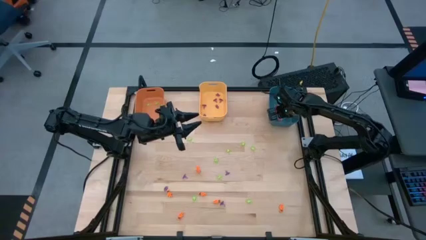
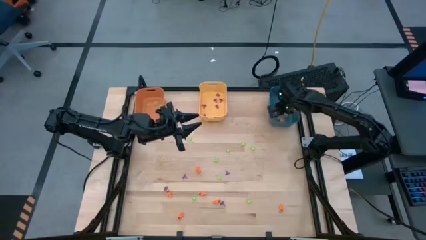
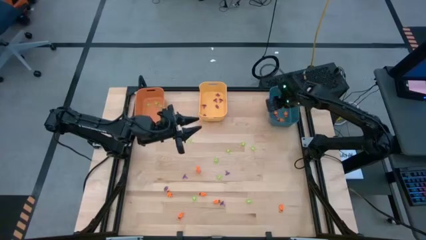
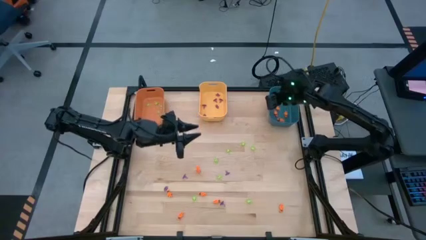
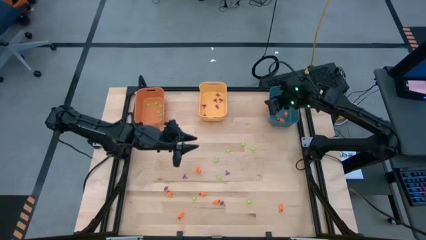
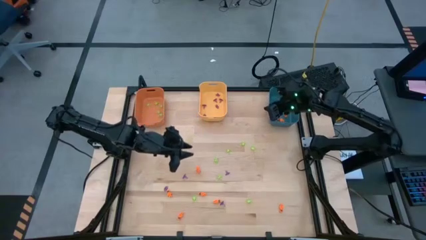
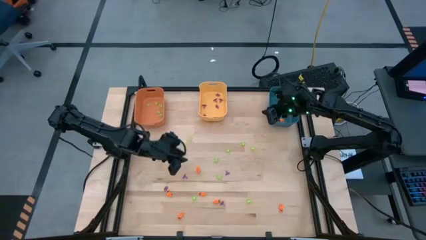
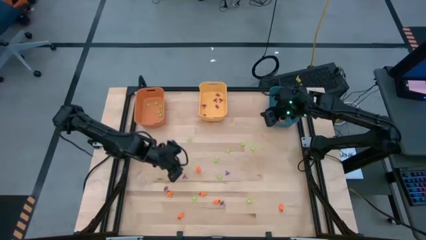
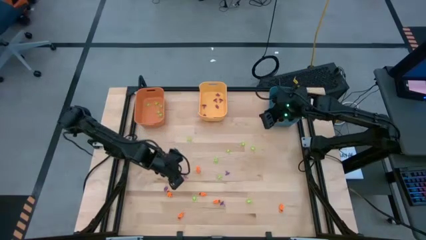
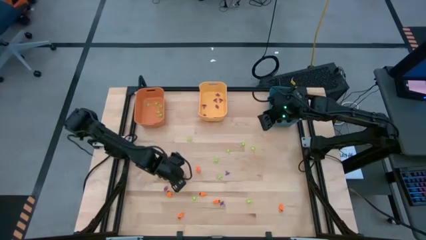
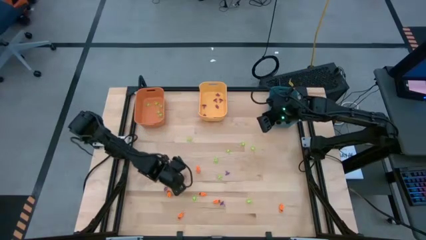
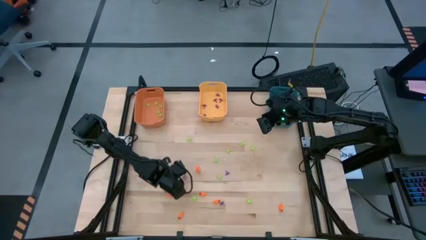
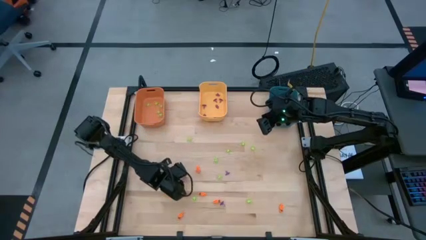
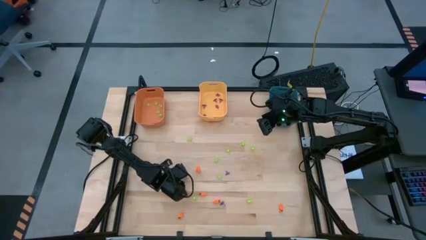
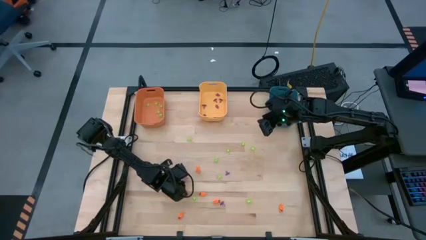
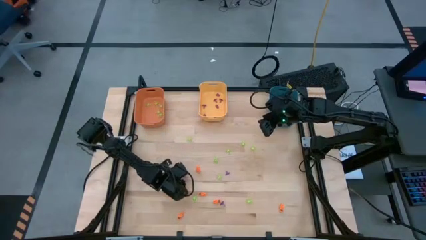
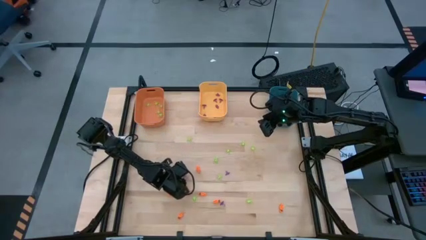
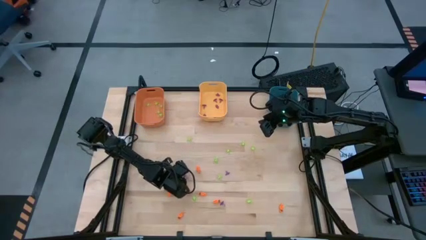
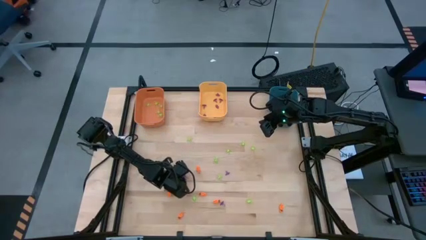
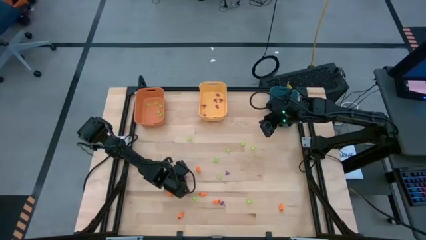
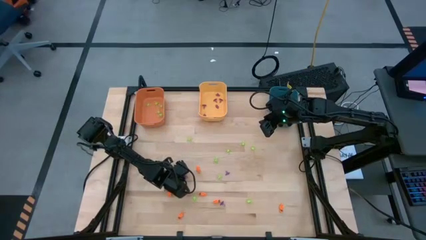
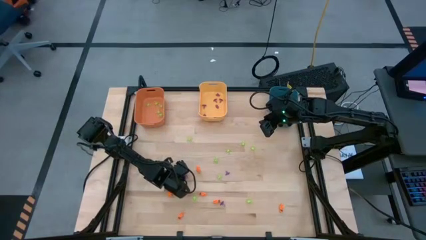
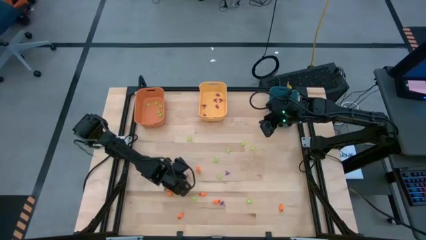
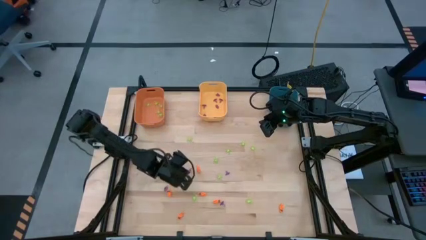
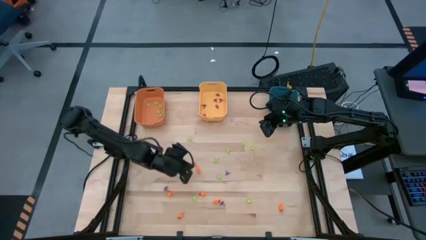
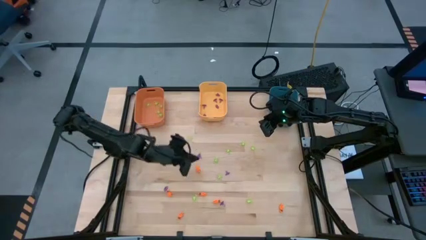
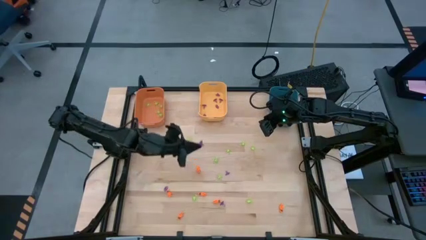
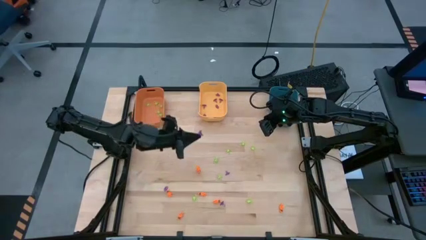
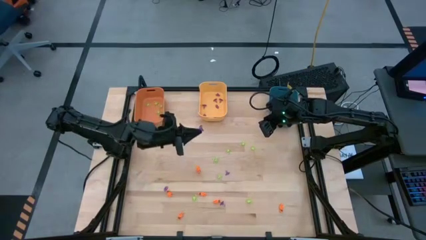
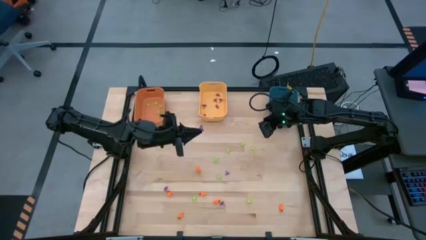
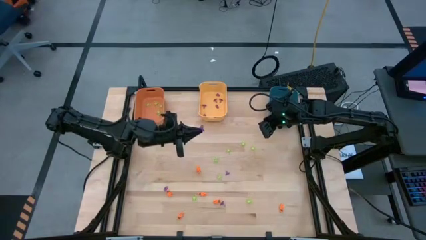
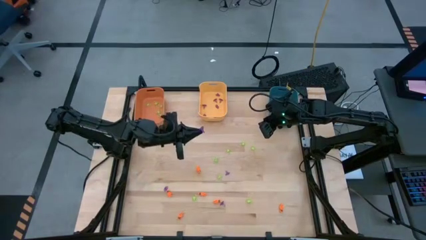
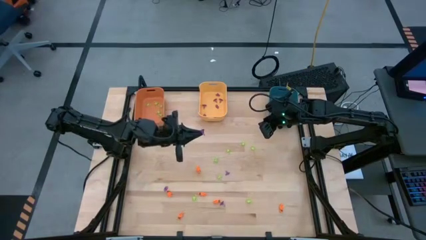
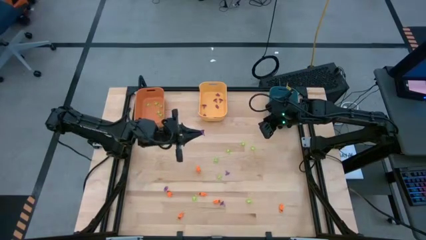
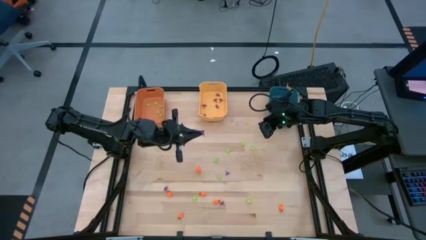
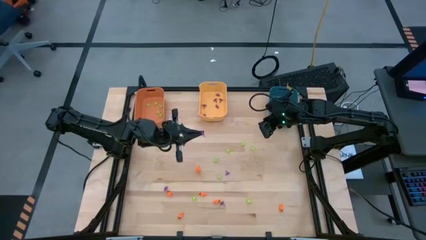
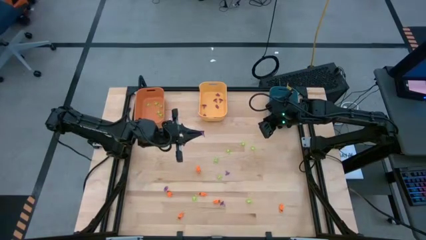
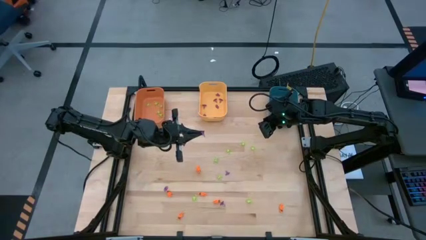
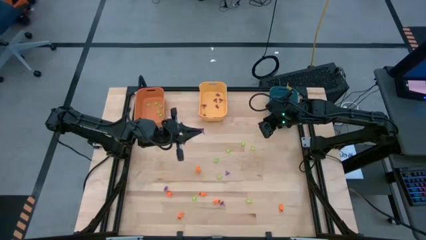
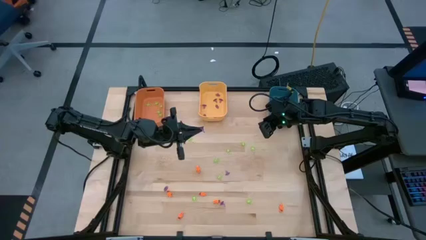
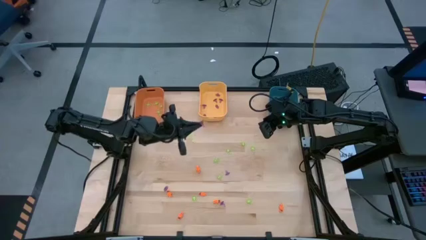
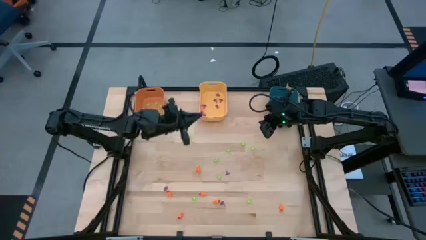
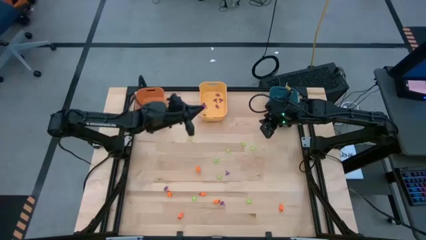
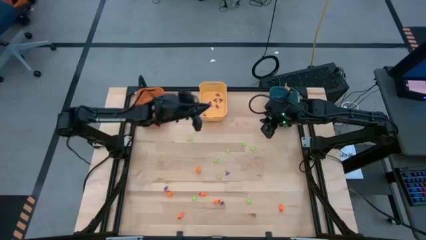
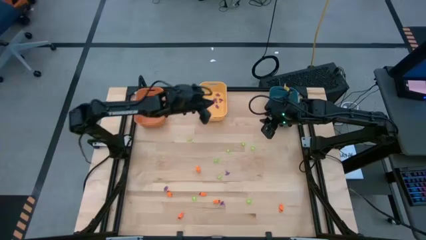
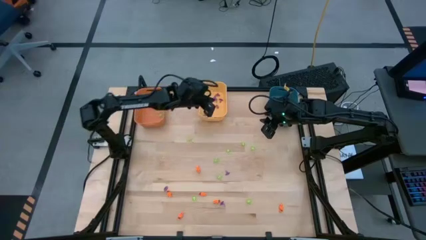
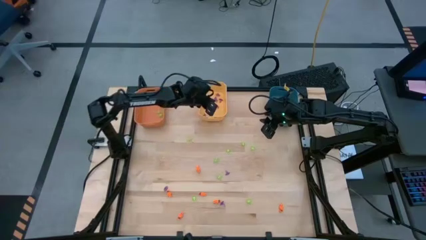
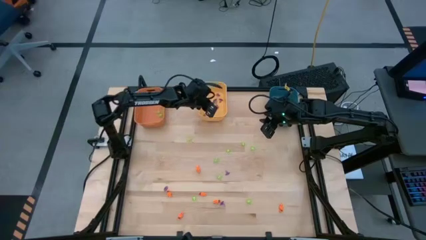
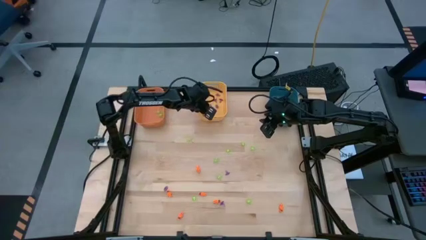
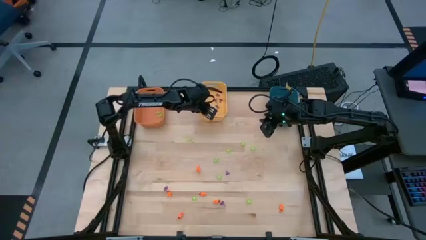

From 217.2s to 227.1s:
Task: Sort Halloween decoration
Put the purple witch hat toy into the yellow bin

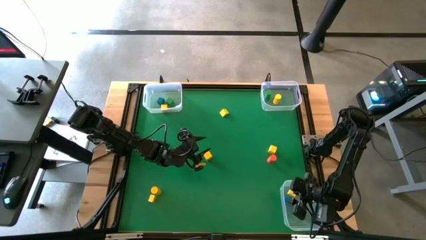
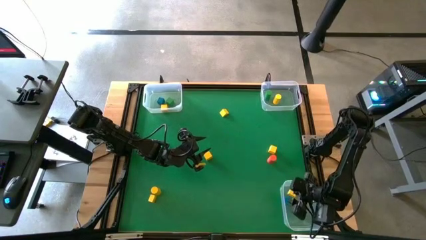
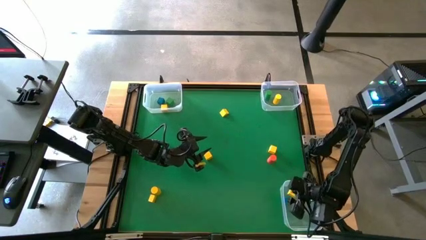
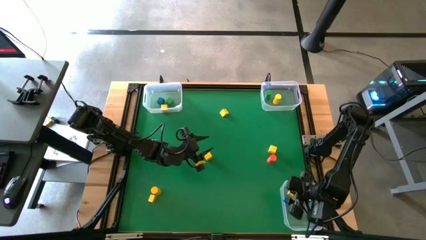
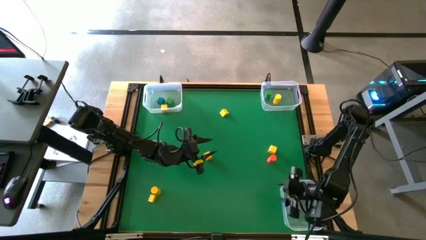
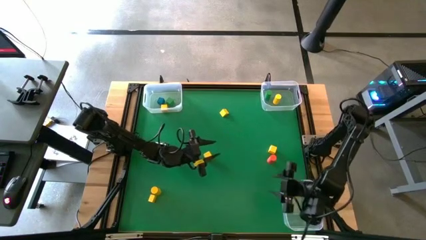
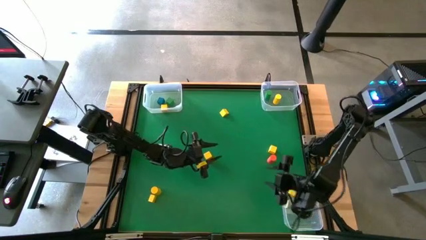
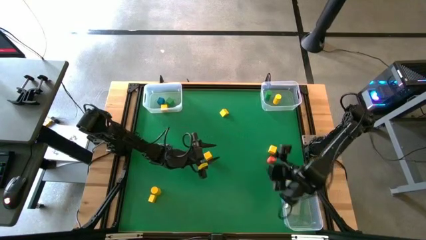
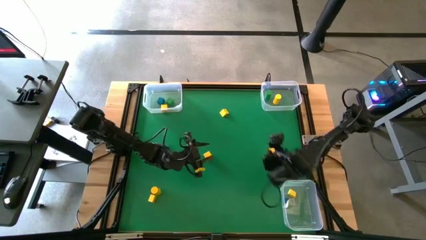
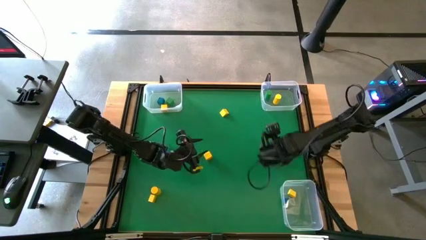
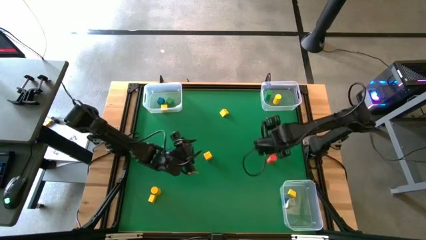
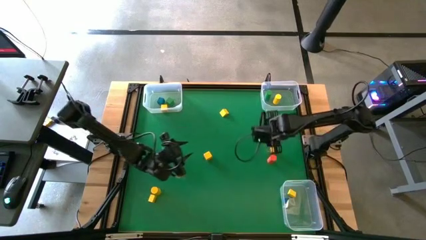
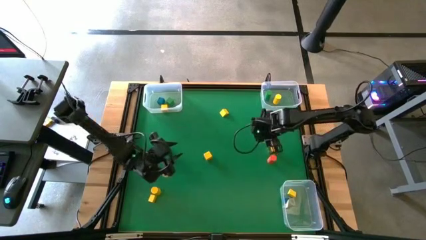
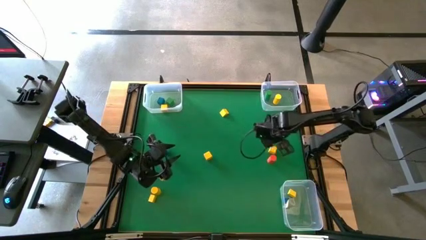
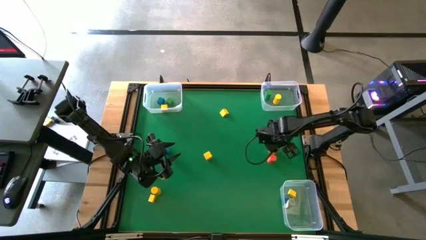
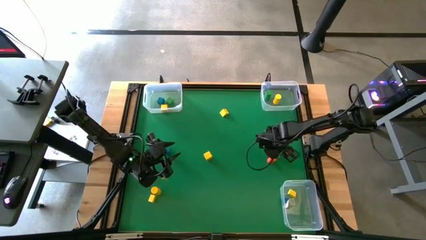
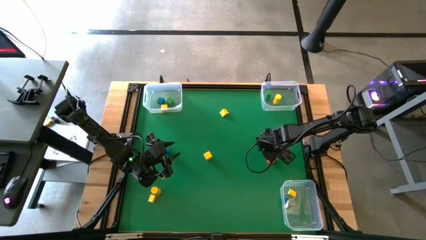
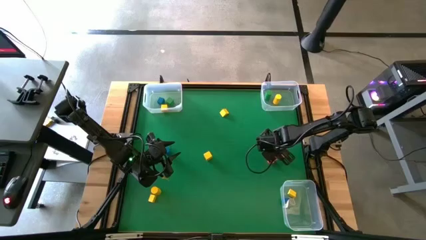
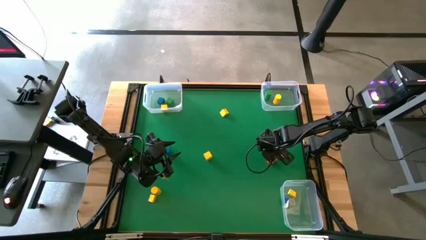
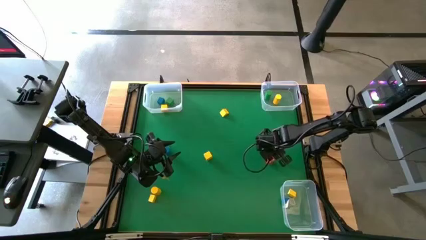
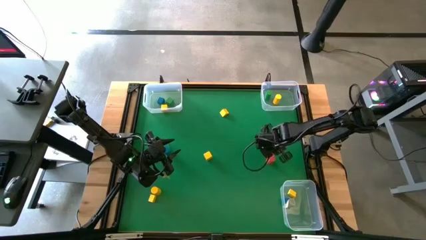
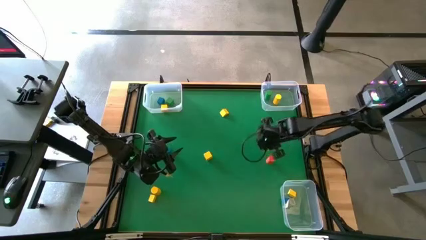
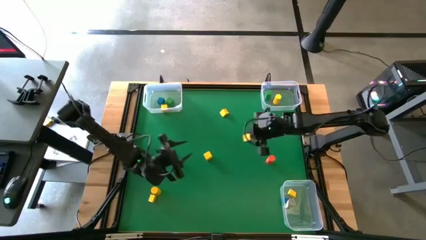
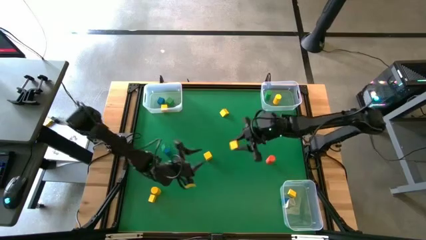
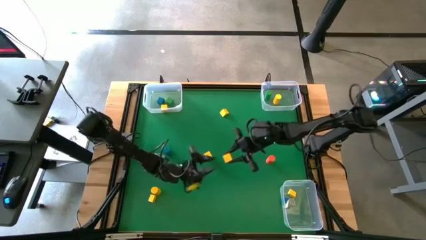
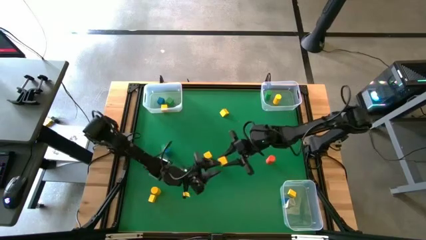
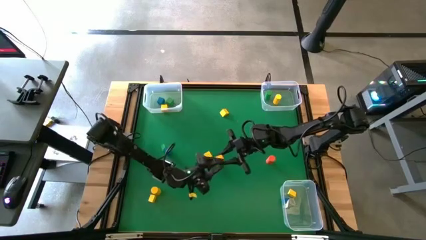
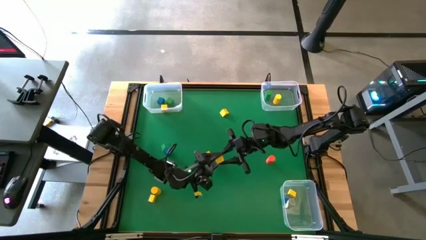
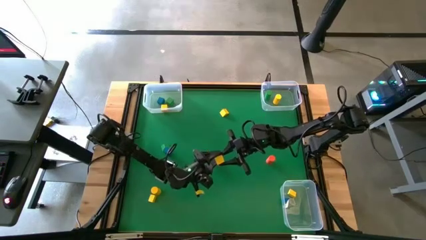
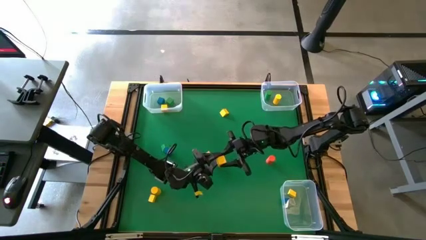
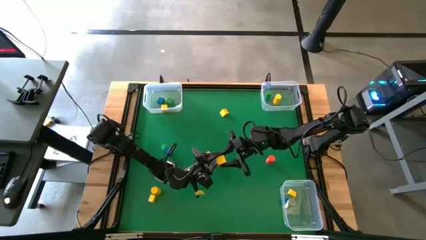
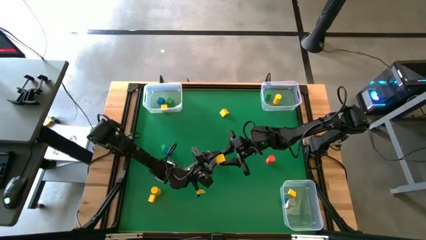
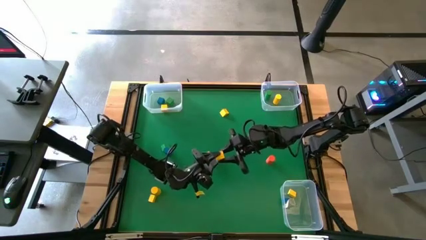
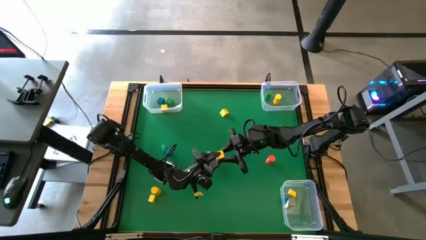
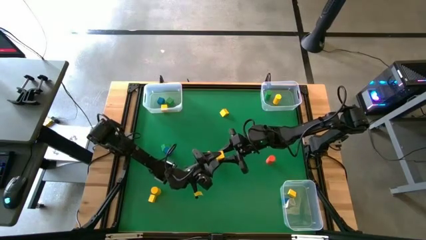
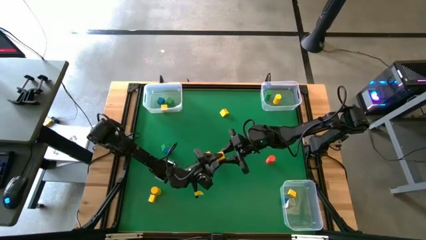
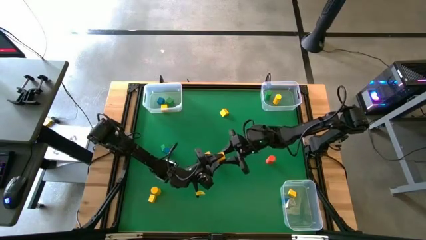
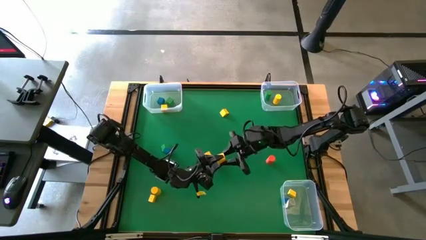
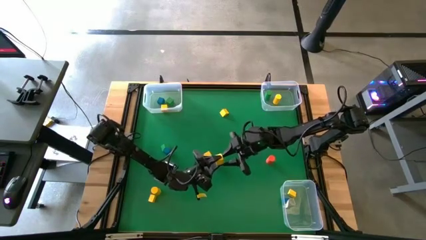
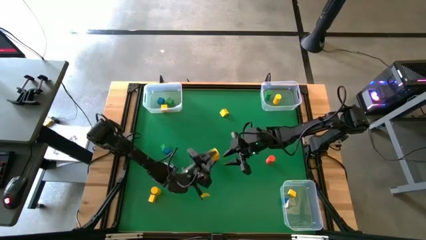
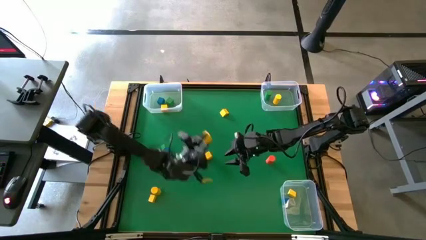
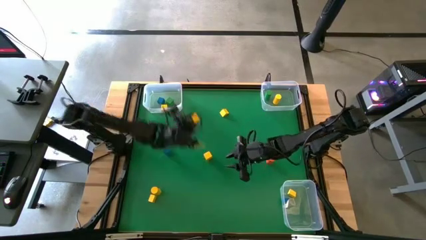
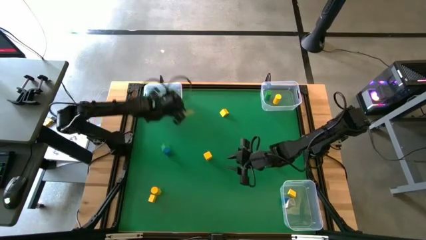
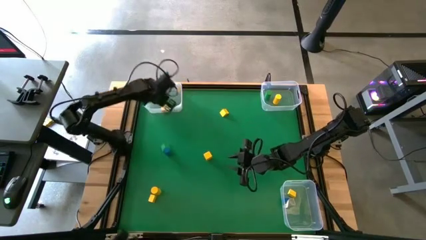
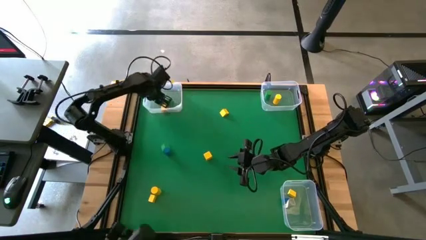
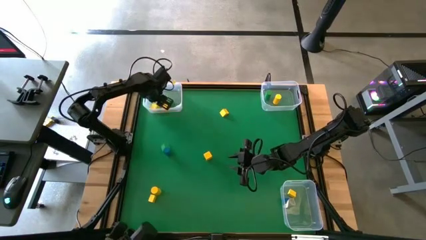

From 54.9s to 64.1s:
Task: Sort blocks by size
Put the yellow cube block into the top left transparent bin
